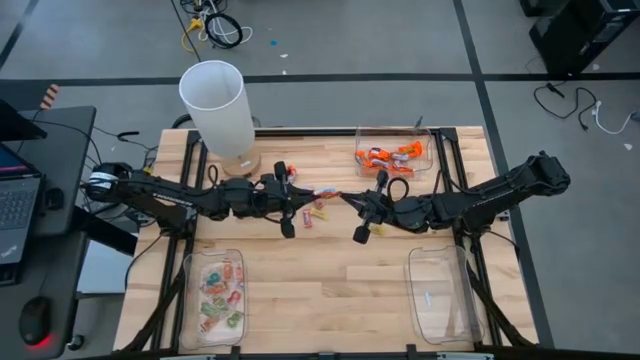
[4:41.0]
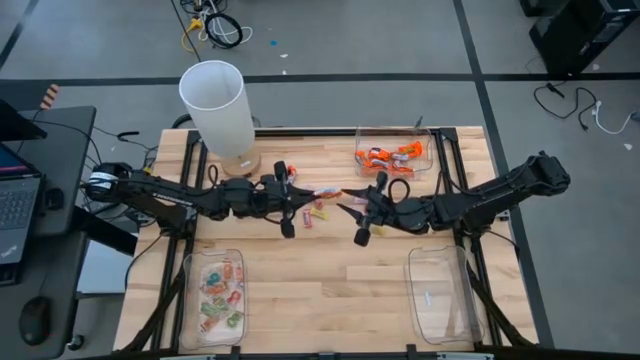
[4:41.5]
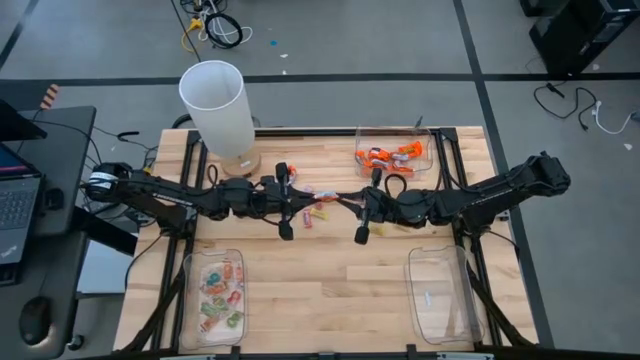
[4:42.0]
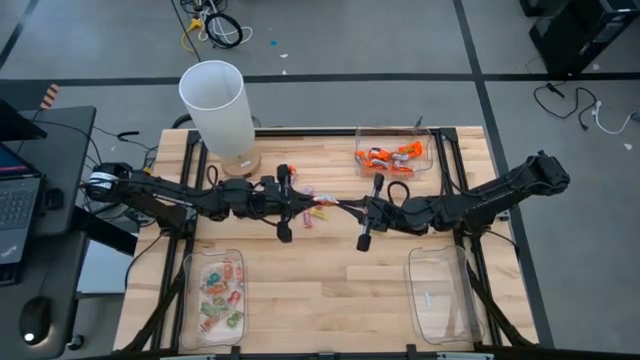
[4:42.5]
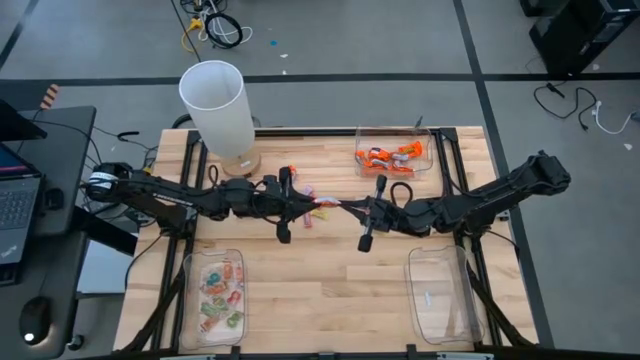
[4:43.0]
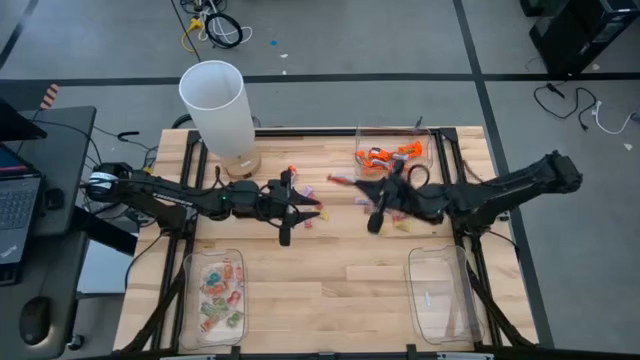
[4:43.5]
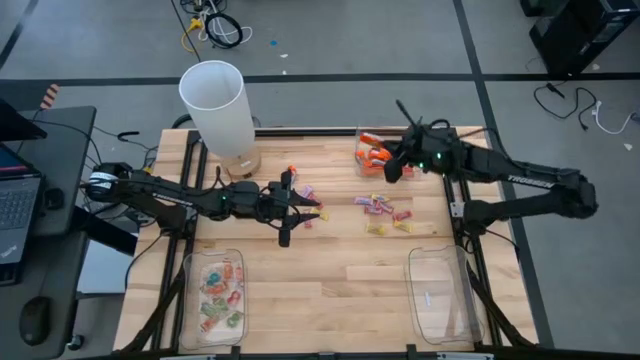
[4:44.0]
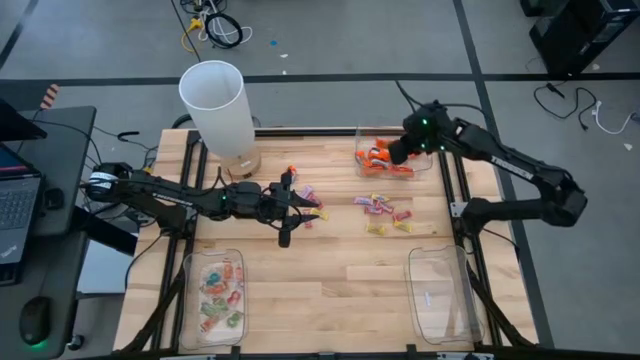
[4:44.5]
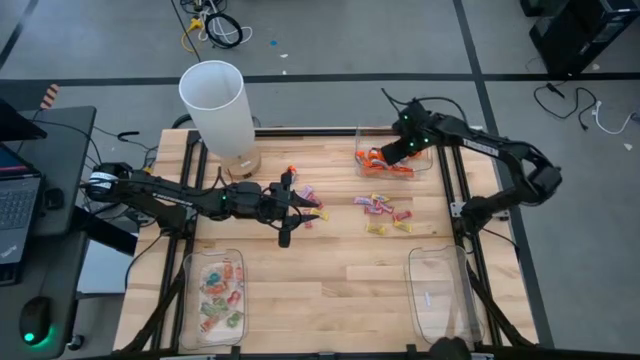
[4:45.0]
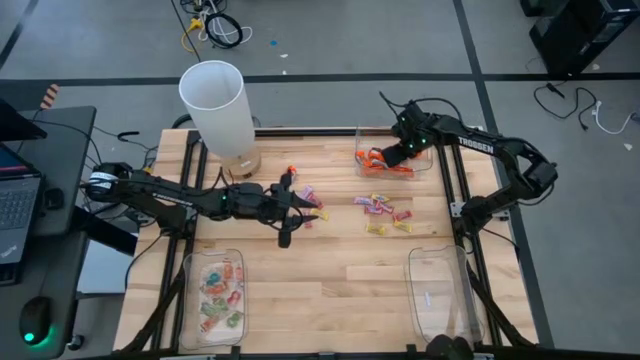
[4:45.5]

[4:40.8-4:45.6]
Task: Sort candy
Put the large orange chocolate bar into the top right transparent bin

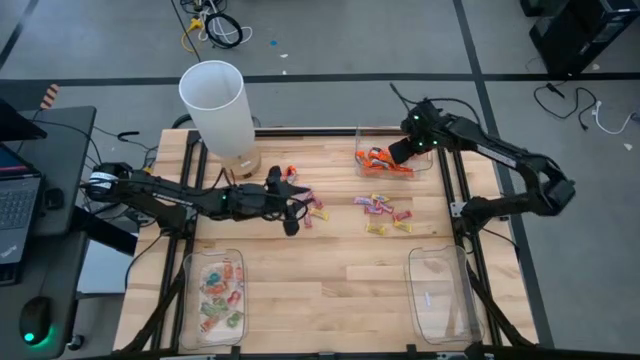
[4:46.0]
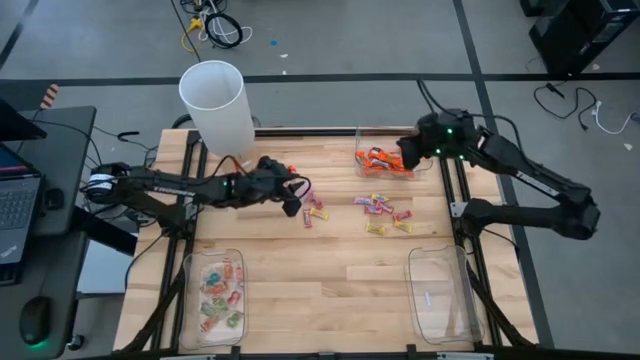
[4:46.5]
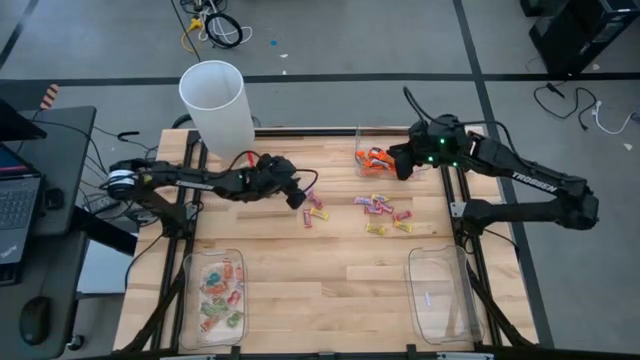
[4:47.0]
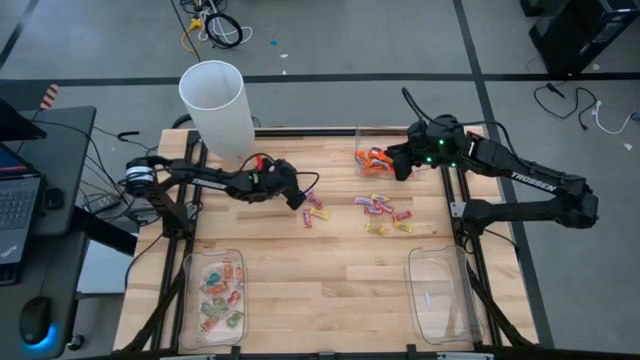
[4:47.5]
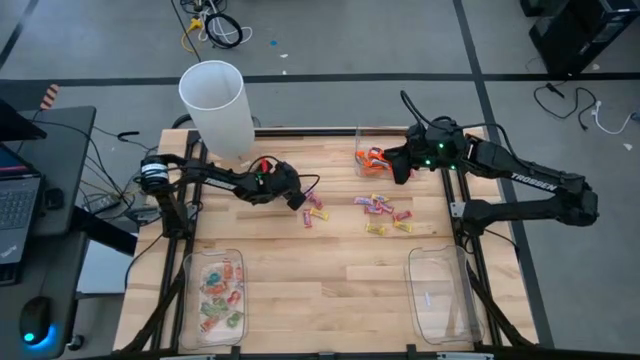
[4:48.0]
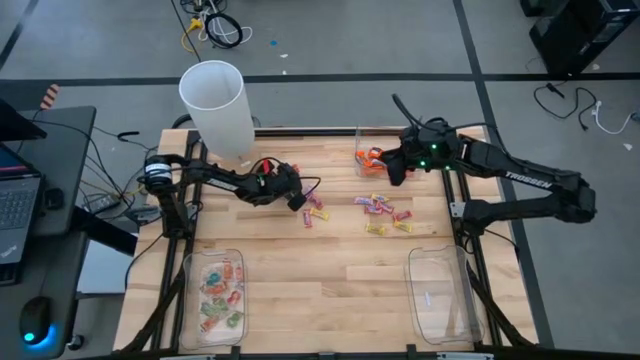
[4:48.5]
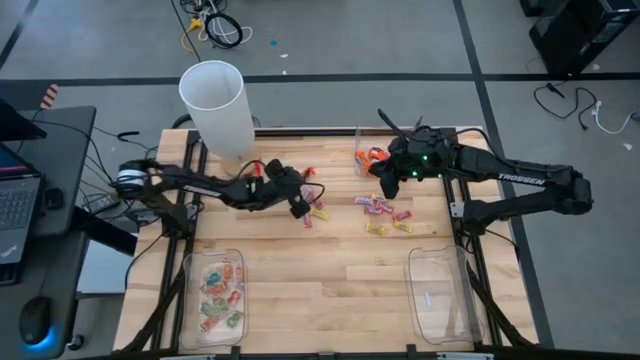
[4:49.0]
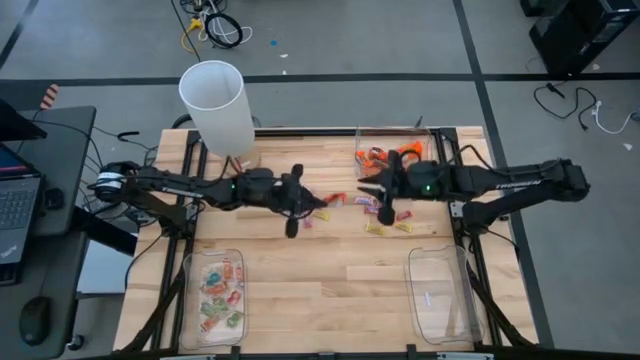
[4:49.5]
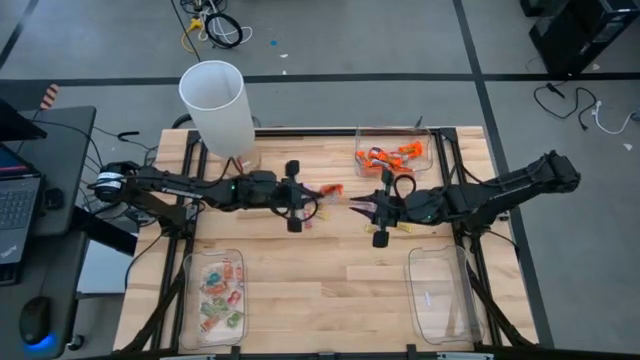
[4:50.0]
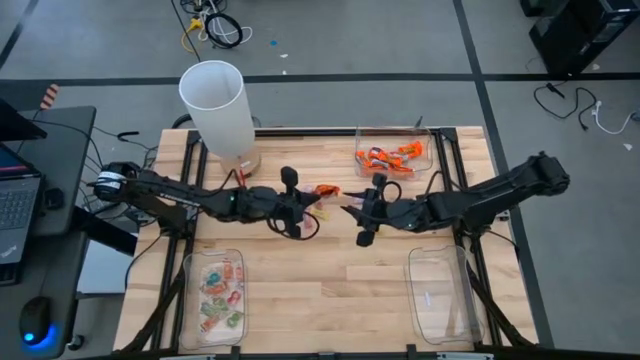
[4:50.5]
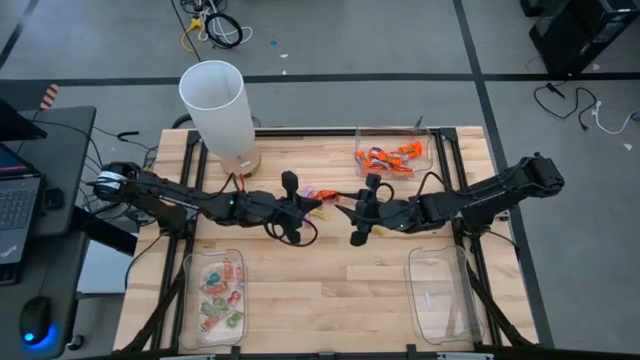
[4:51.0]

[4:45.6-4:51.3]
Put the large orange chocolate bar into the top right transparent bin

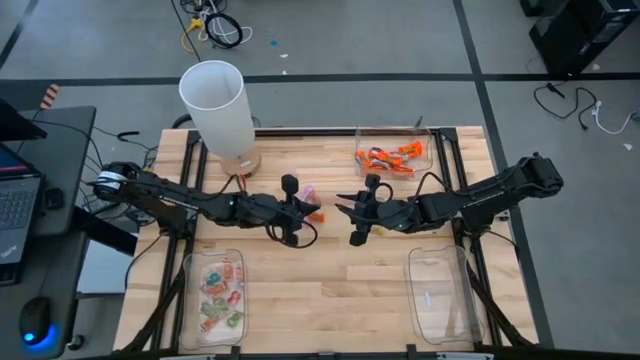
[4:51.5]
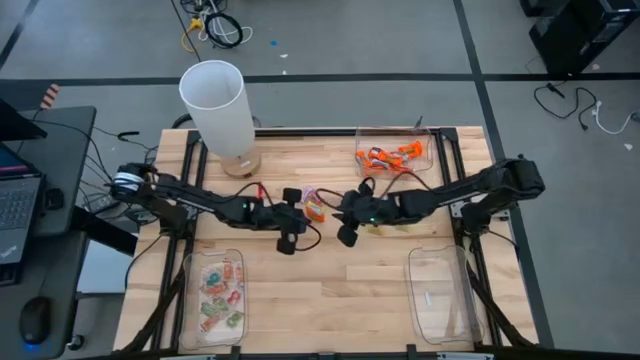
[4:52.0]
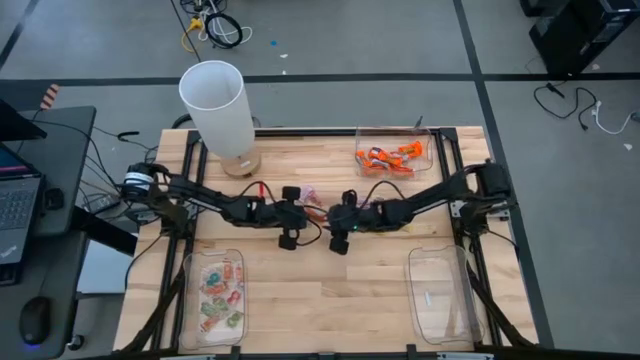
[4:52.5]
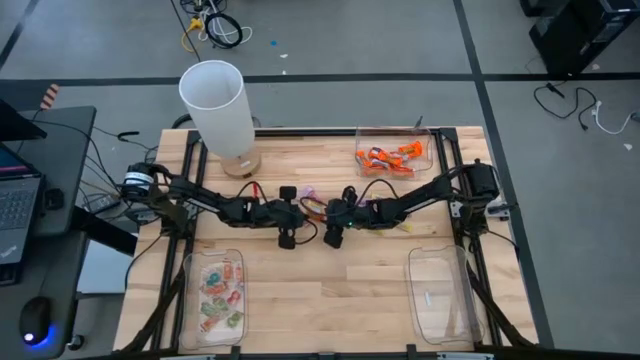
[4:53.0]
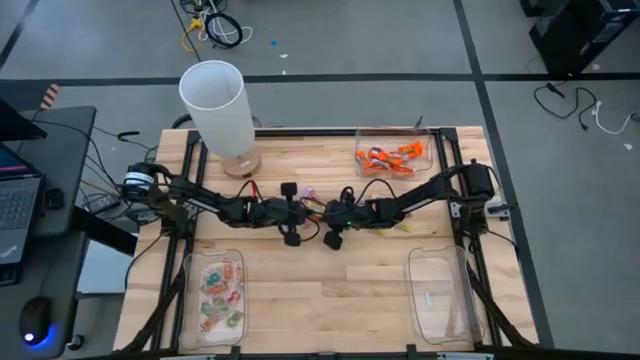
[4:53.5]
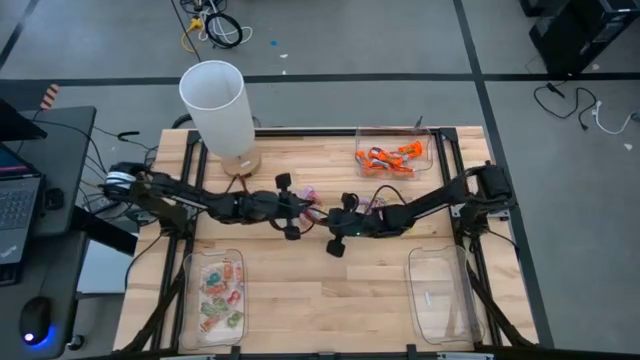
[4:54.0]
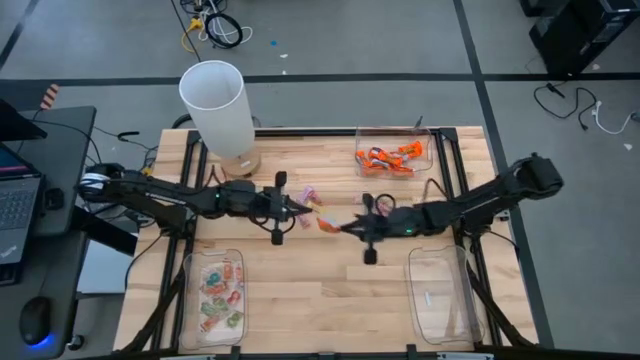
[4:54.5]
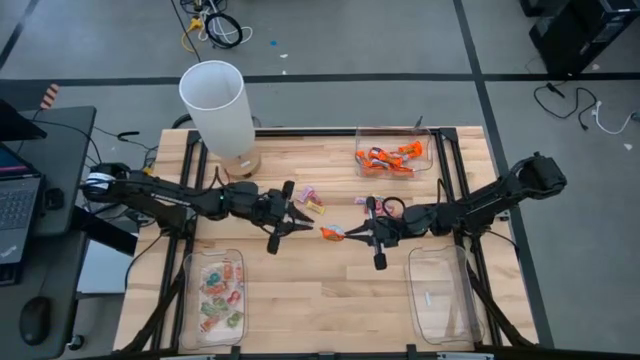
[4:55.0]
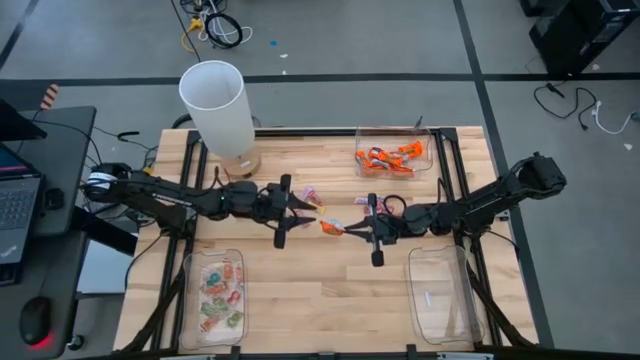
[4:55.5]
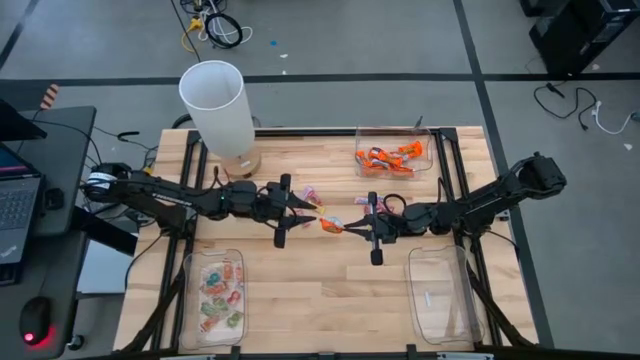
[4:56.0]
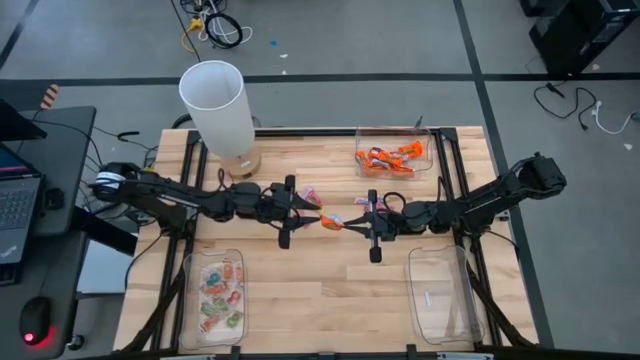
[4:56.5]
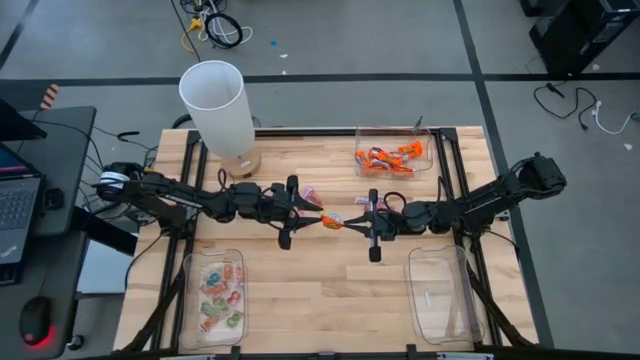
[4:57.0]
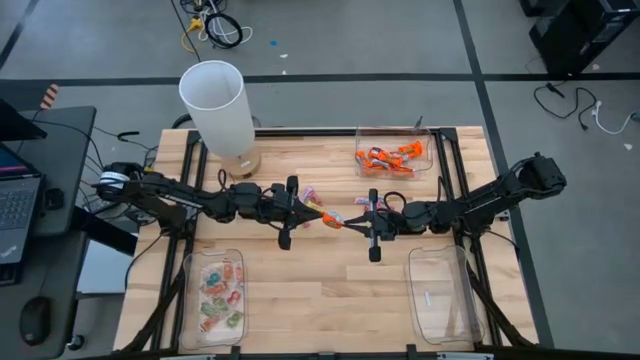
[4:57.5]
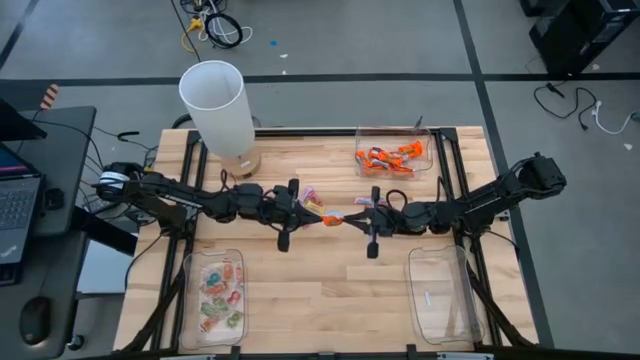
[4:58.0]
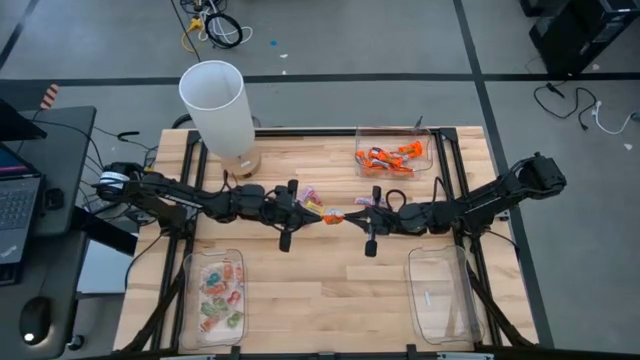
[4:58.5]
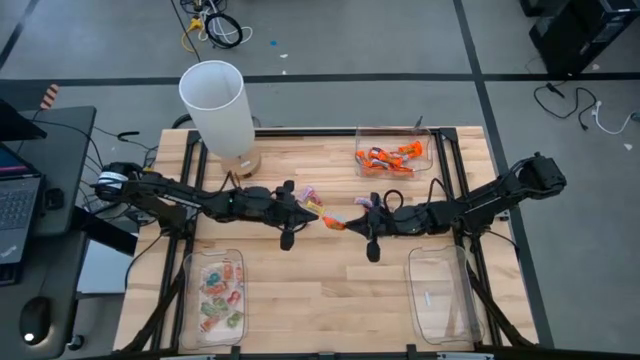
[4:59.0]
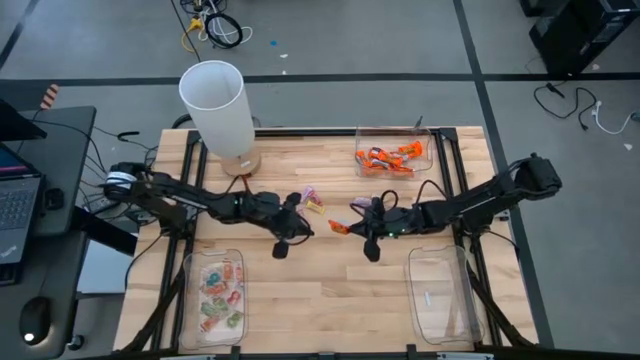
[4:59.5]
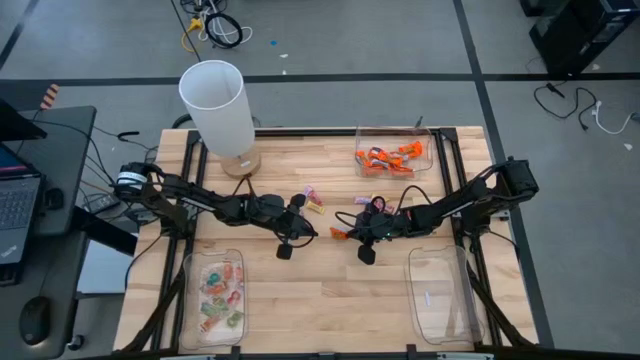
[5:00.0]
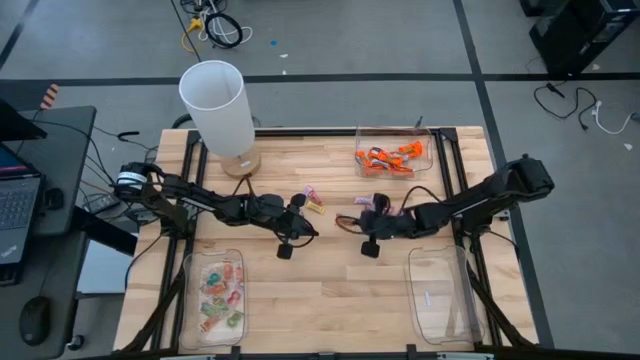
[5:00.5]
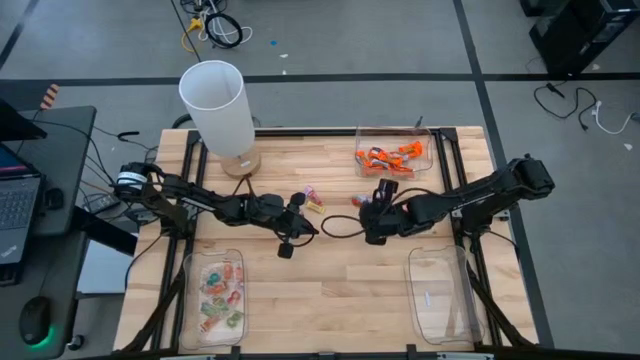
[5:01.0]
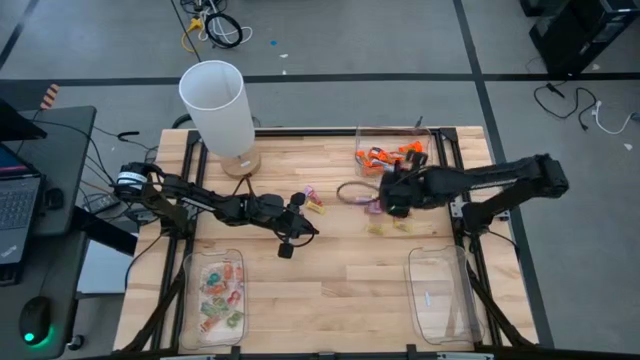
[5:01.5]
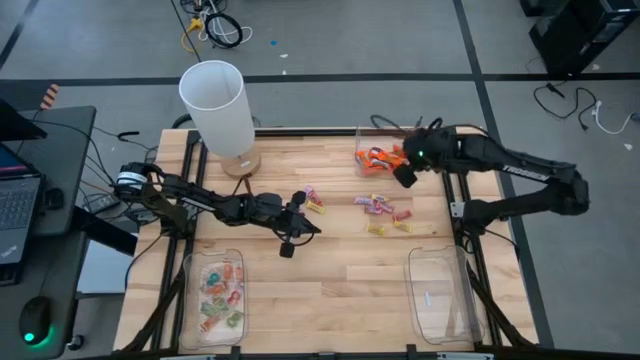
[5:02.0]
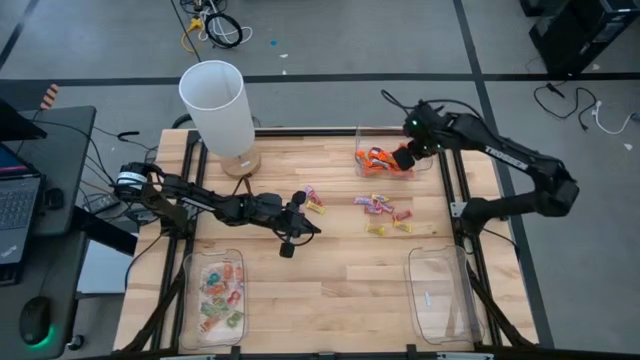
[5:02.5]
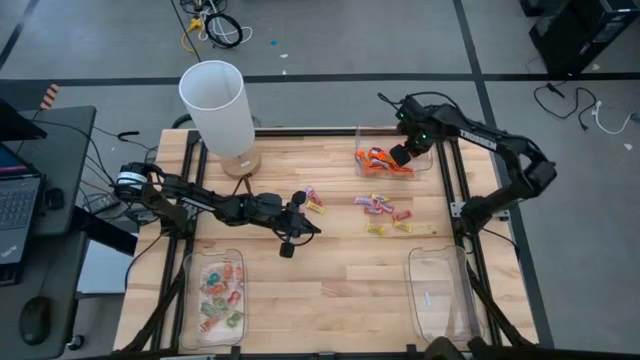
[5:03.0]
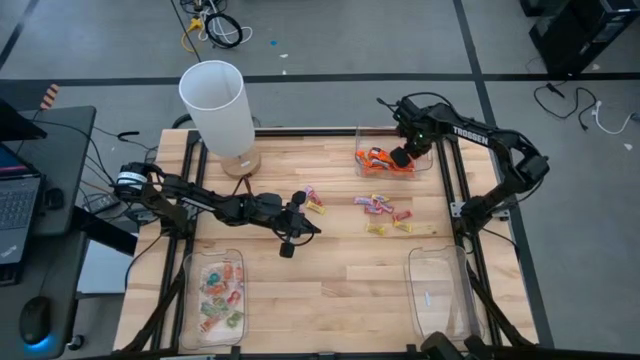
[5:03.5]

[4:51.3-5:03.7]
Put the large orange chocolate bar into the top right transparent bin
